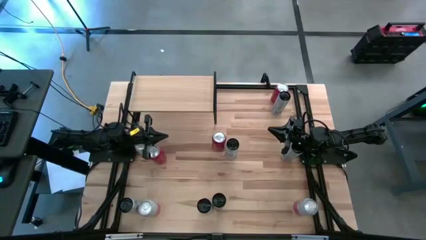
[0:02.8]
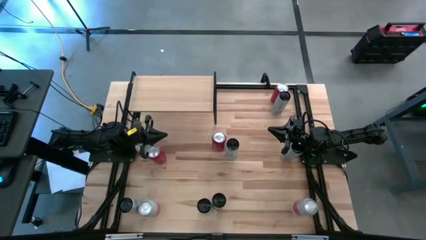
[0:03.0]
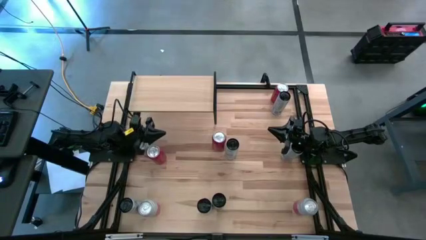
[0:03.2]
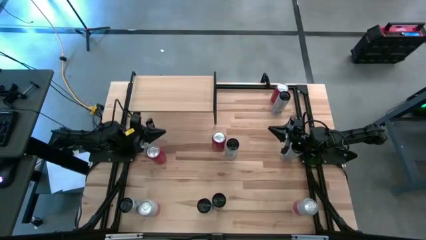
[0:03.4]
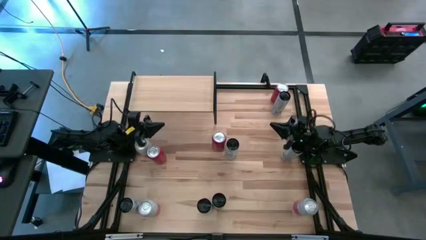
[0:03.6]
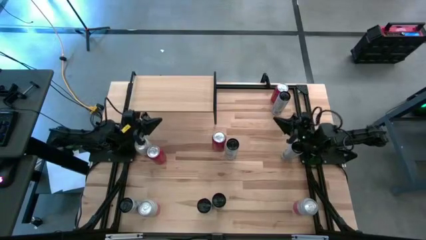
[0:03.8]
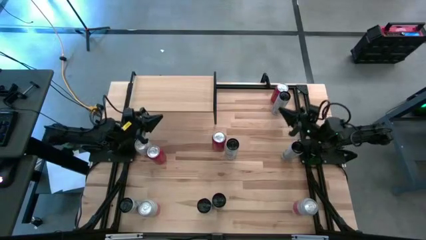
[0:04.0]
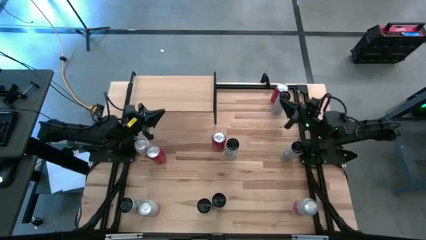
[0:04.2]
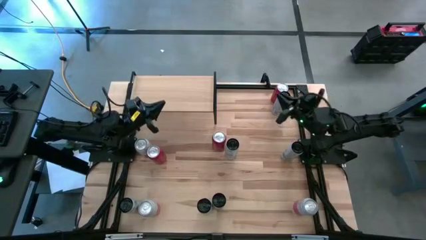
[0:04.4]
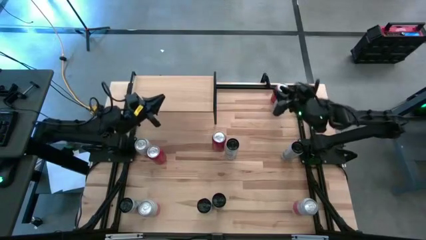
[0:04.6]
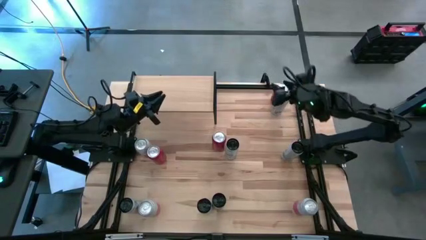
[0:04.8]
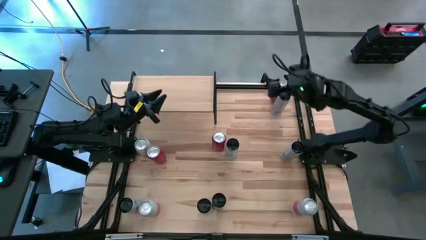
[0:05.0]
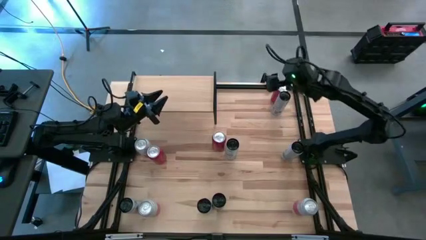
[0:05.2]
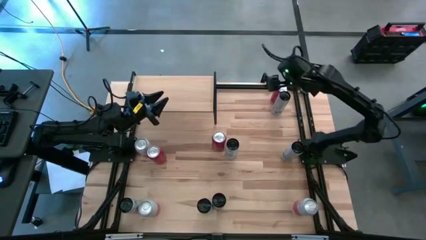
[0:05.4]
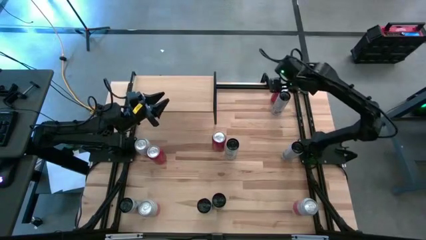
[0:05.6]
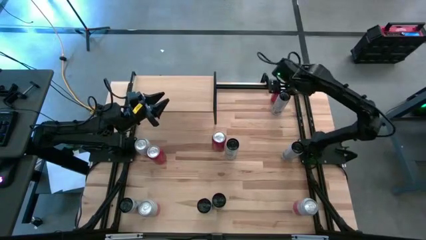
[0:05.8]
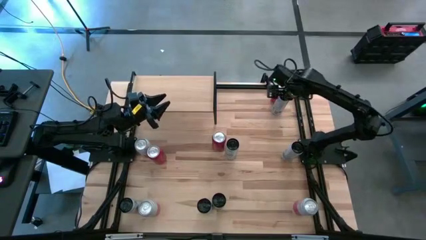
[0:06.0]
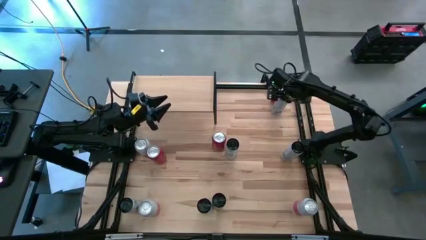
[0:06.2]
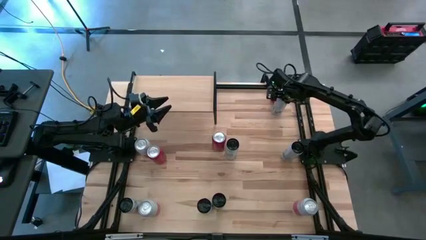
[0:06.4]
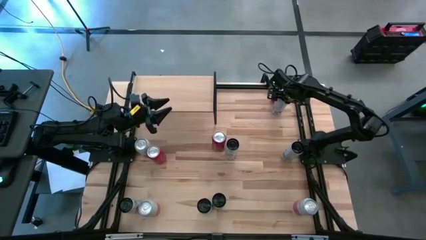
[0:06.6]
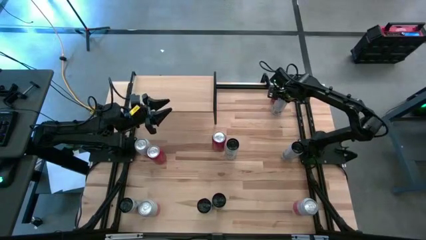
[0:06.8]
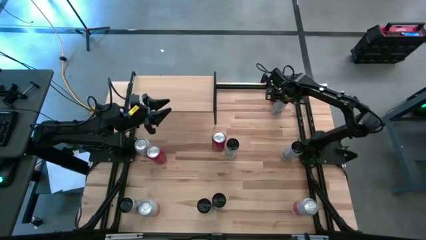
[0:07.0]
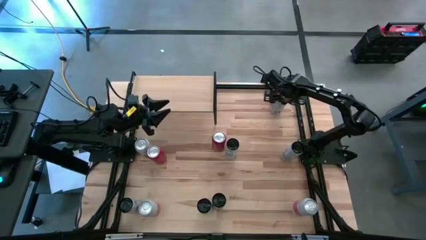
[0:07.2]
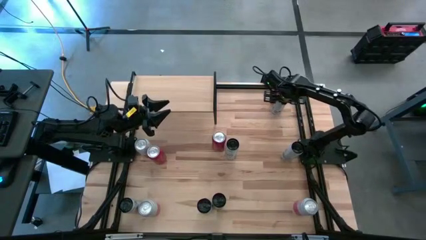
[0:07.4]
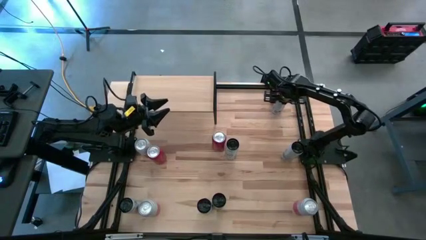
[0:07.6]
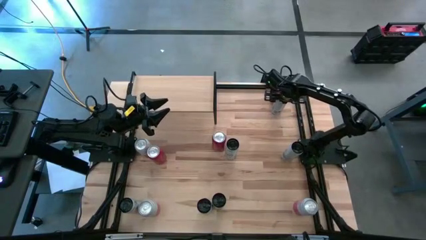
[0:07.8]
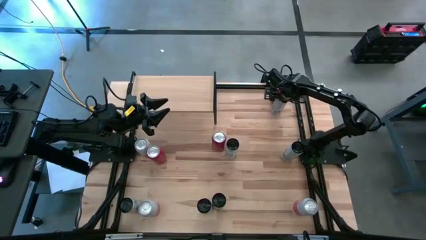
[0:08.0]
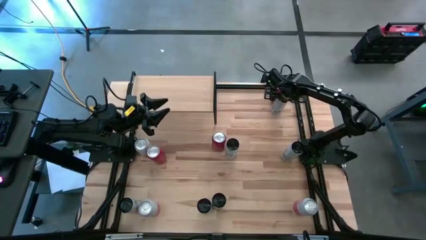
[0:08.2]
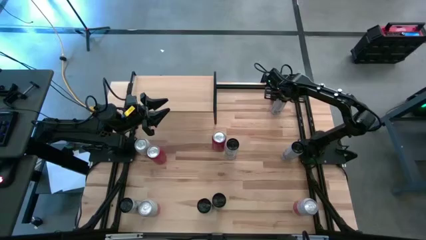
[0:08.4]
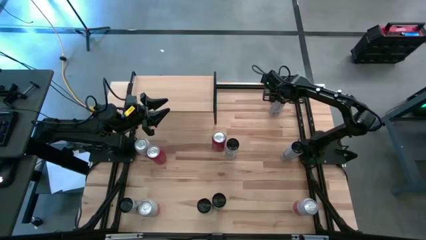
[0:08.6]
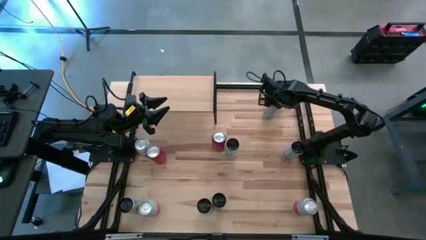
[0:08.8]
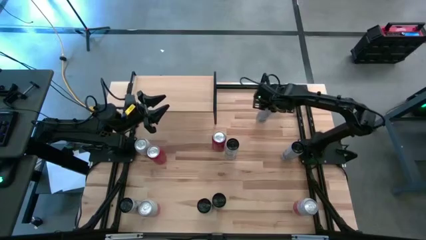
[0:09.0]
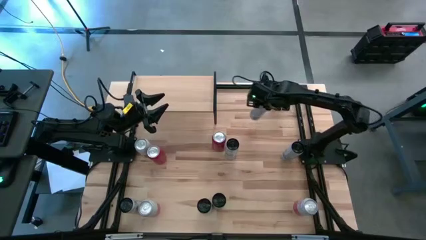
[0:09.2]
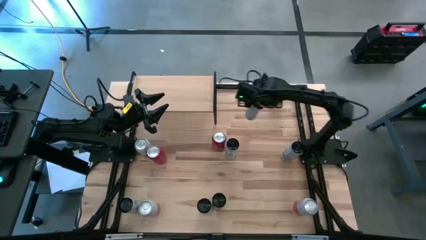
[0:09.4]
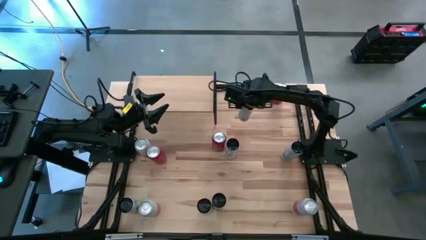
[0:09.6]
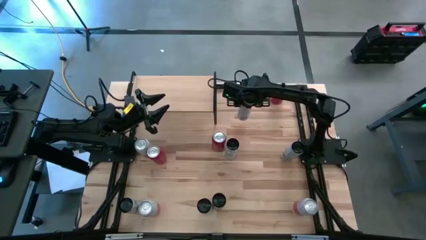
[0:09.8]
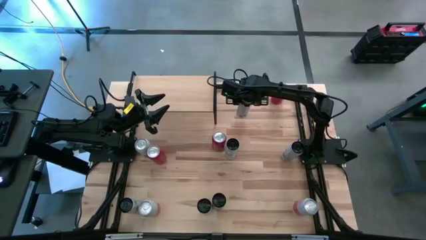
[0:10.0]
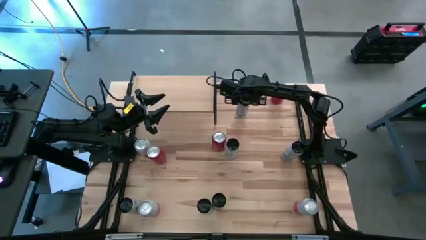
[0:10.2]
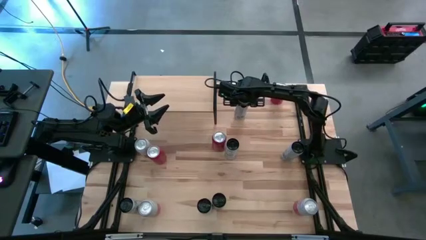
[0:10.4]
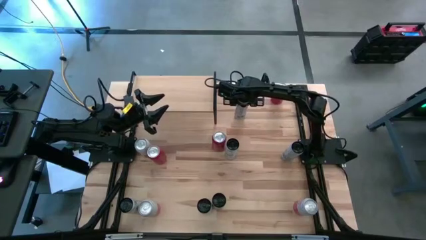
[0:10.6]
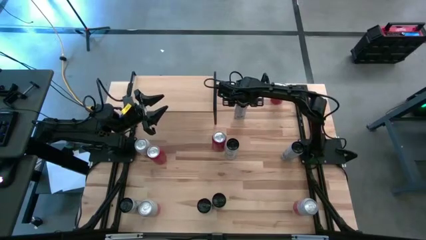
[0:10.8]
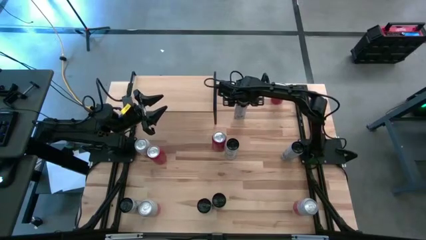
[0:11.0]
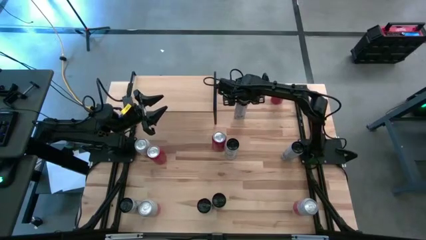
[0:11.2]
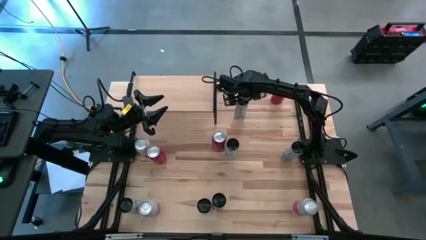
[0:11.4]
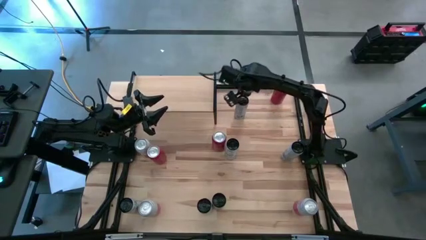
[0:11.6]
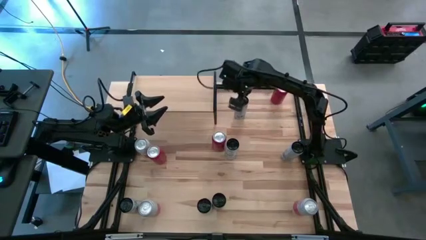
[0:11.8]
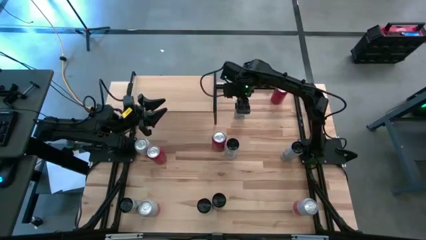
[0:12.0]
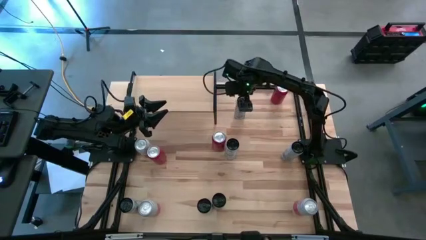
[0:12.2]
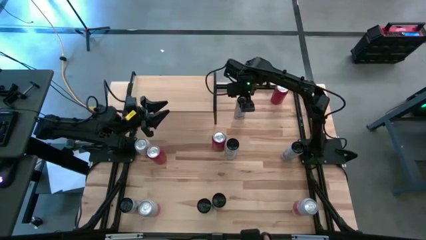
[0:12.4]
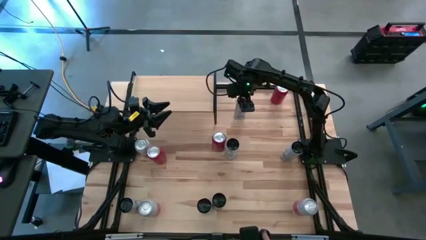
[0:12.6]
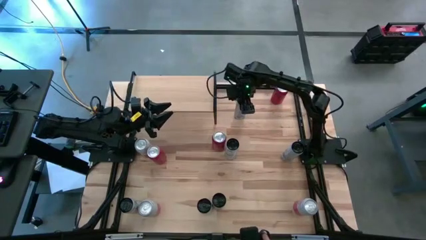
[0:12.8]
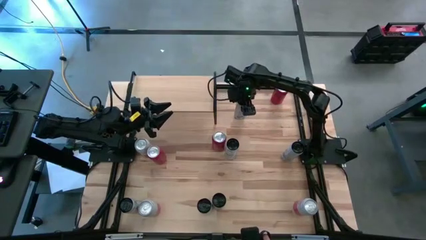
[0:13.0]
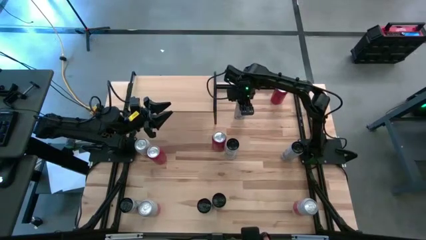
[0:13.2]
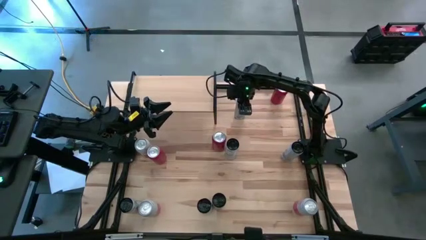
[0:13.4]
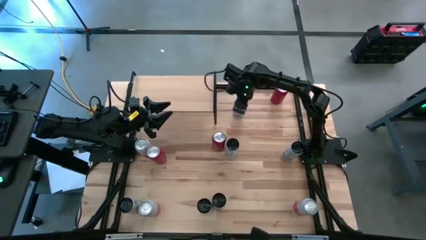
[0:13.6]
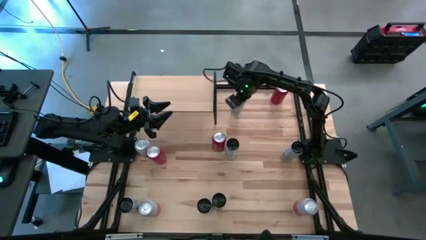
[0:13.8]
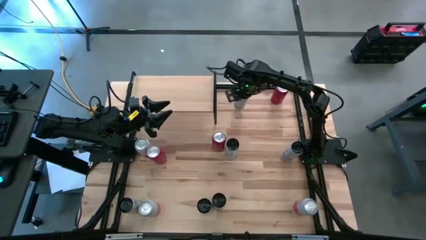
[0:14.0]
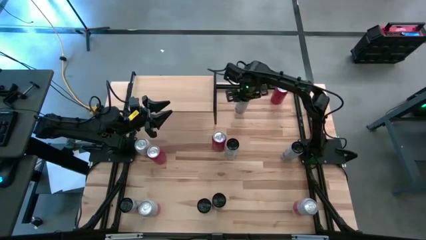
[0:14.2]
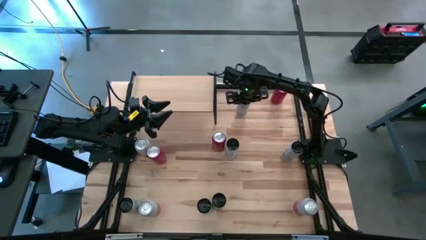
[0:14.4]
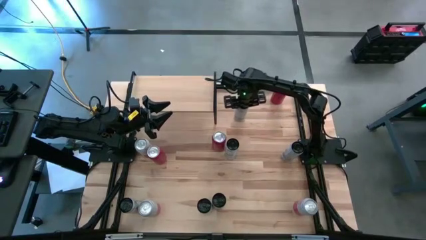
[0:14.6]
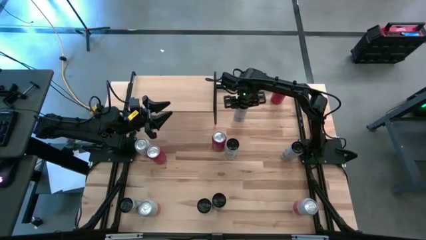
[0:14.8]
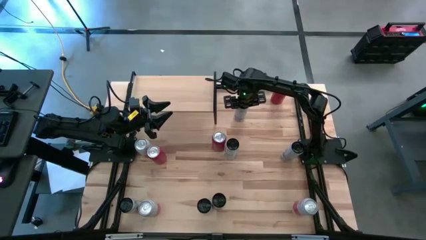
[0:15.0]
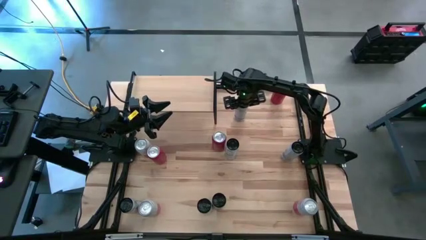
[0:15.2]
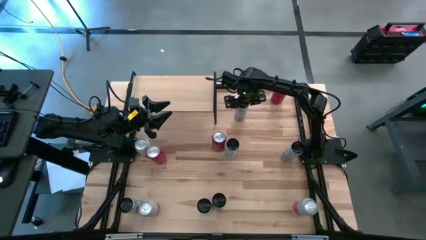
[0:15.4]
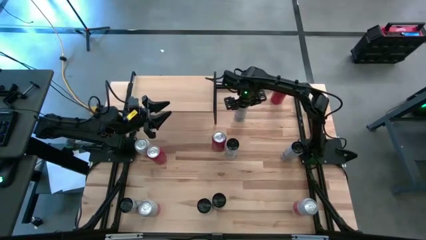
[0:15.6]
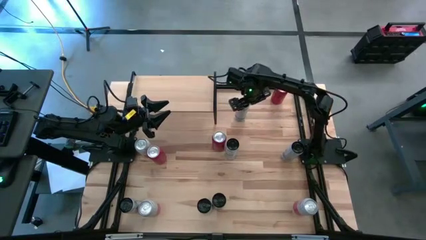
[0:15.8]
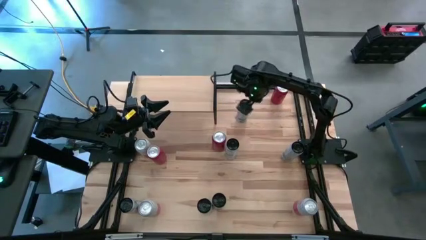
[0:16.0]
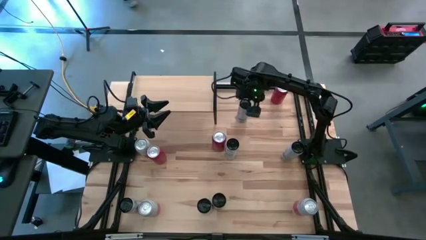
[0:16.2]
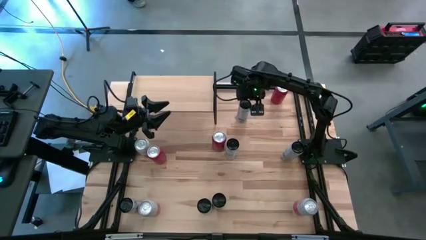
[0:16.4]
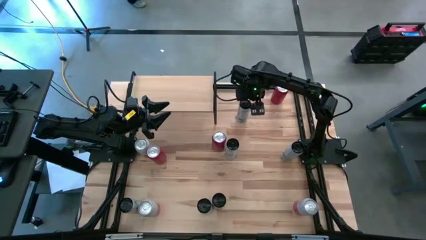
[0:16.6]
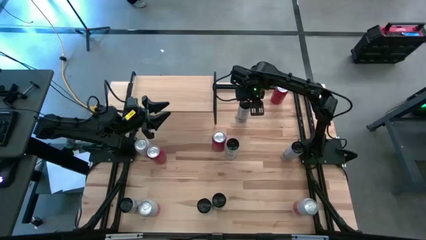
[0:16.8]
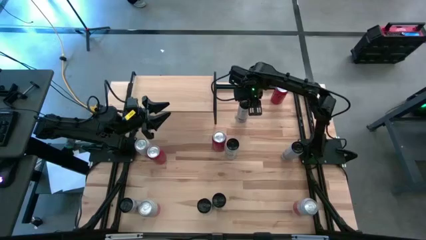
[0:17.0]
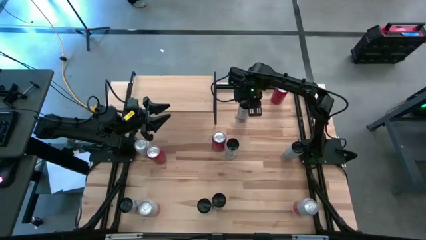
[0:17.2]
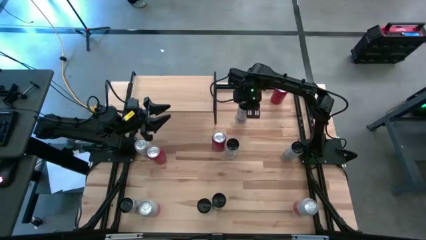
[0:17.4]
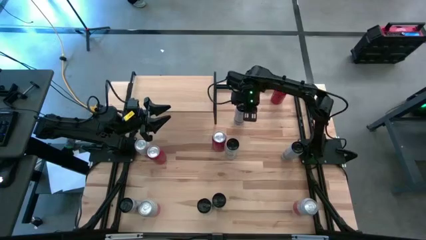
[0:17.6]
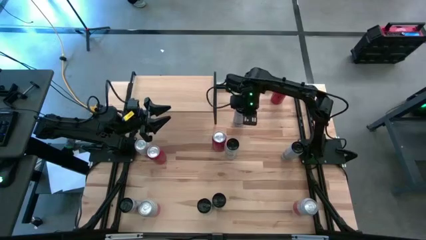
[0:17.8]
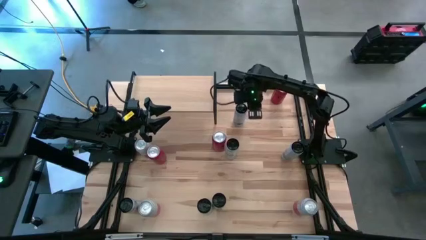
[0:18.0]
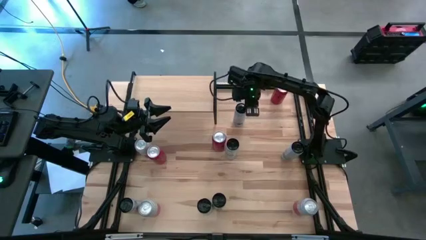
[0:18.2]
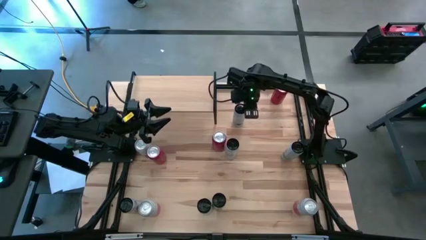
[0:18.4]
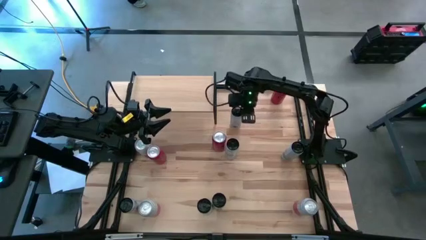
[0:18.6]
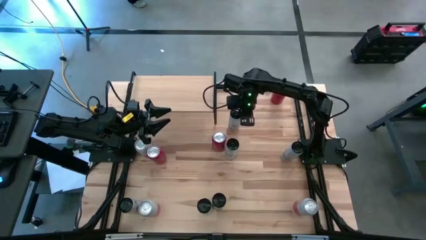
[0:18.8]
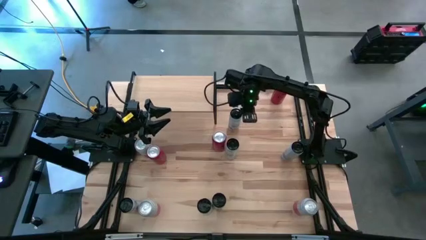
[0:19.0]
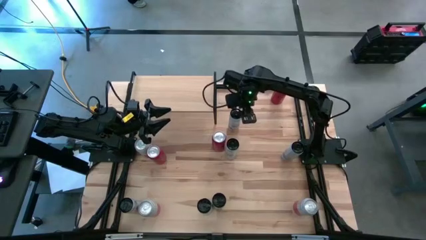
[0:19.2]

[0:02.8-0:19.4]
Task: Place canned beverage on shelf
Put the top blue soda can on the shelf
